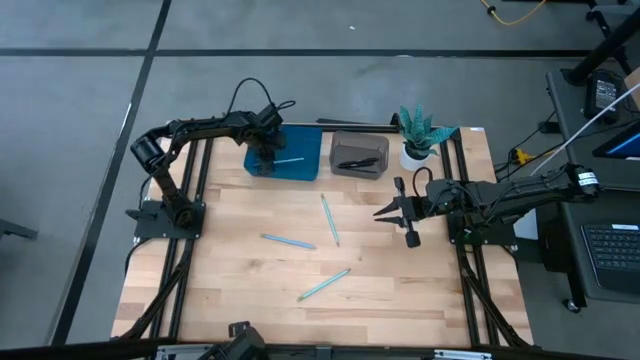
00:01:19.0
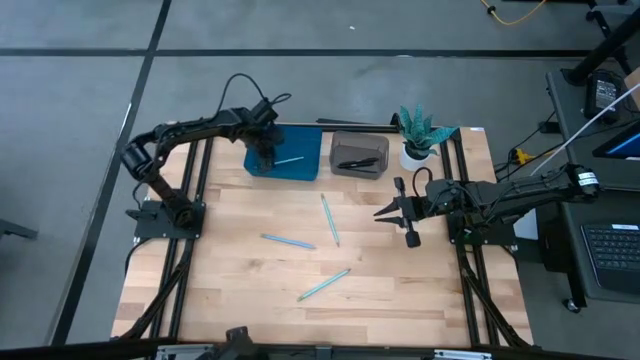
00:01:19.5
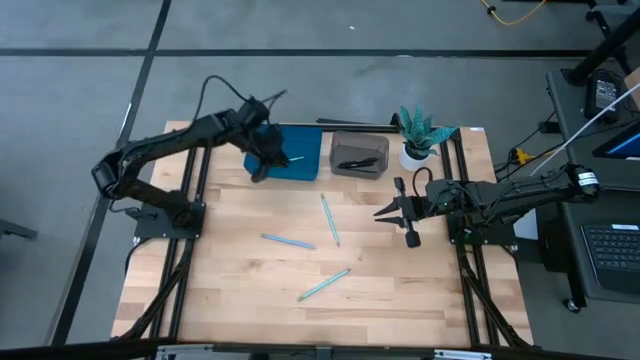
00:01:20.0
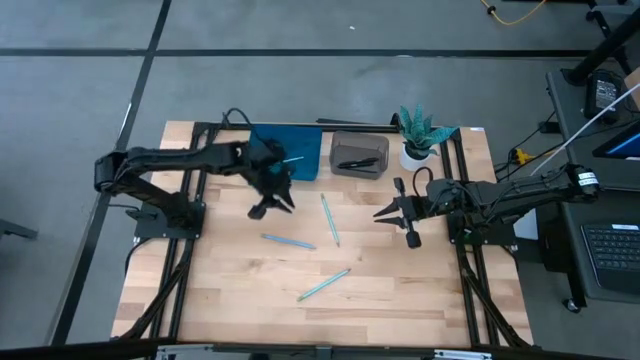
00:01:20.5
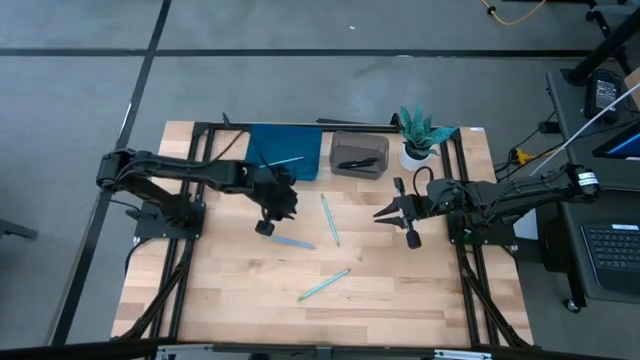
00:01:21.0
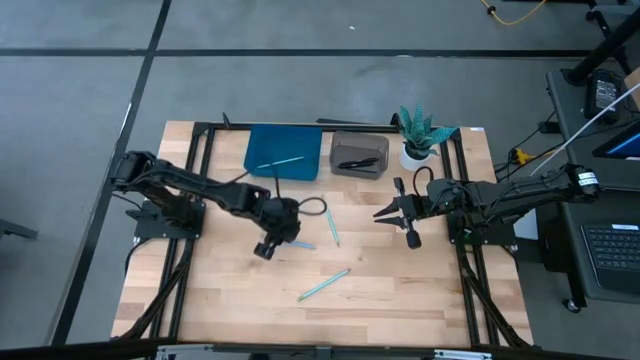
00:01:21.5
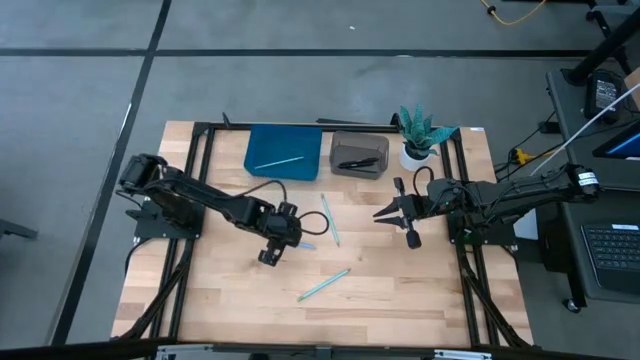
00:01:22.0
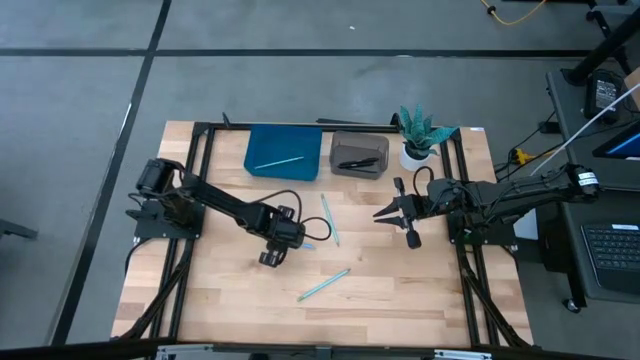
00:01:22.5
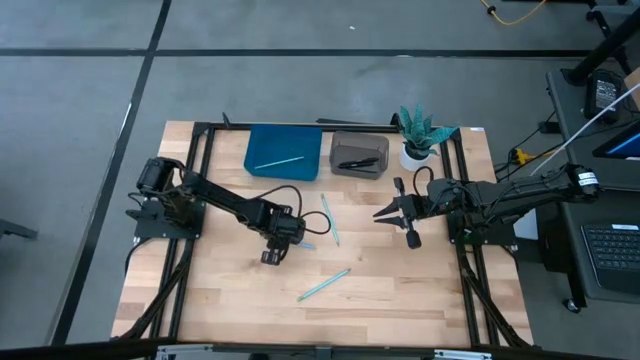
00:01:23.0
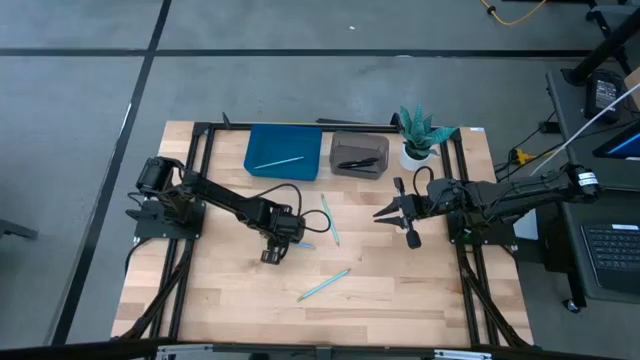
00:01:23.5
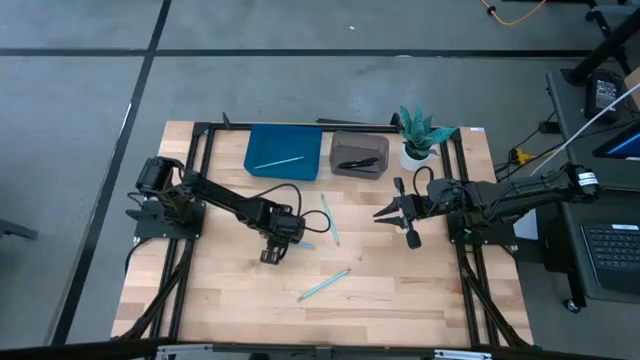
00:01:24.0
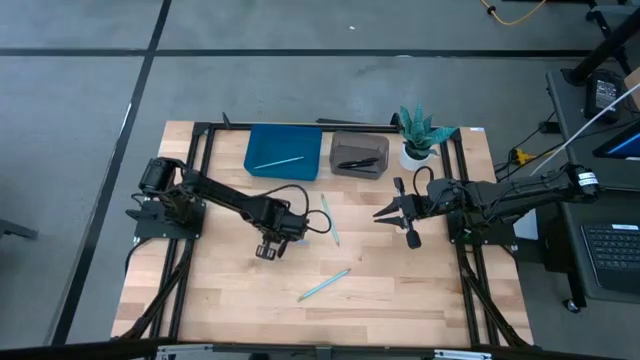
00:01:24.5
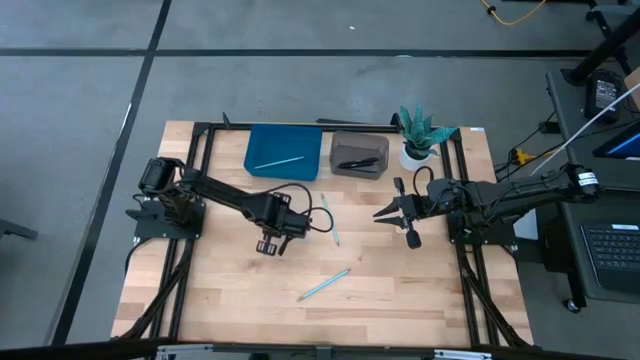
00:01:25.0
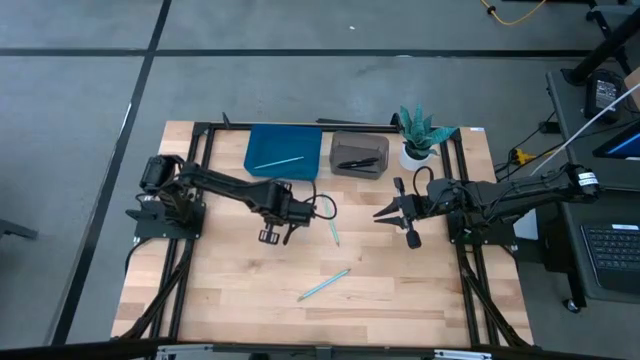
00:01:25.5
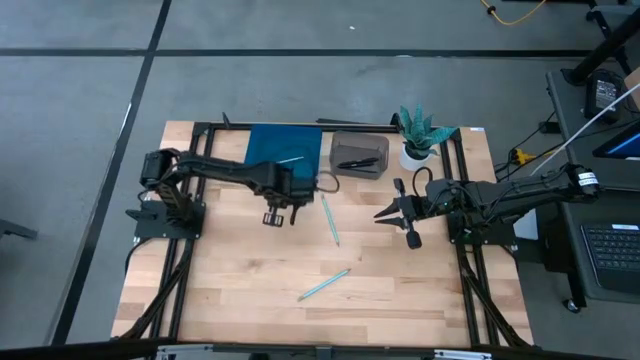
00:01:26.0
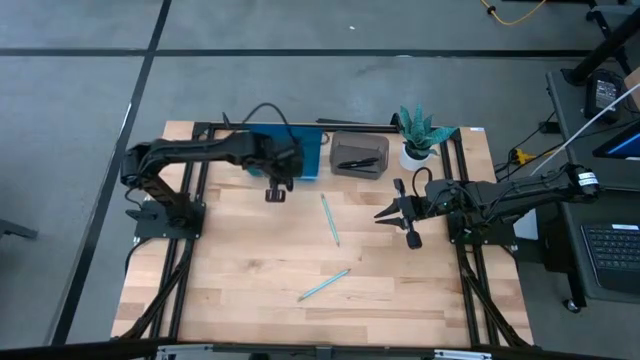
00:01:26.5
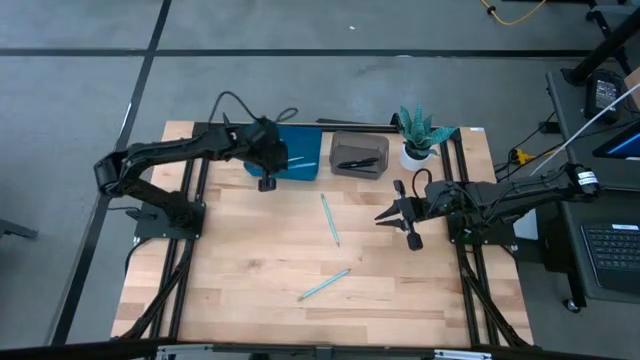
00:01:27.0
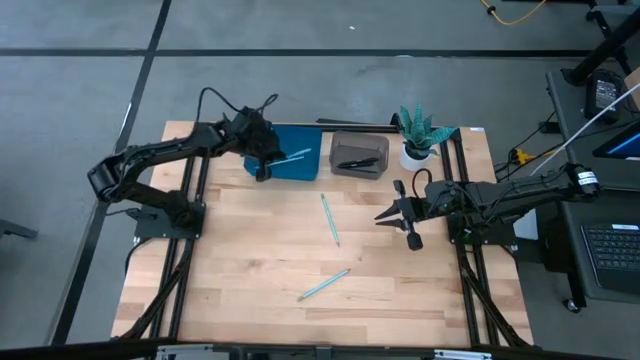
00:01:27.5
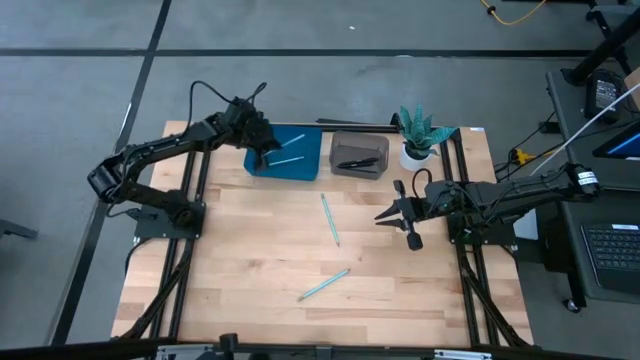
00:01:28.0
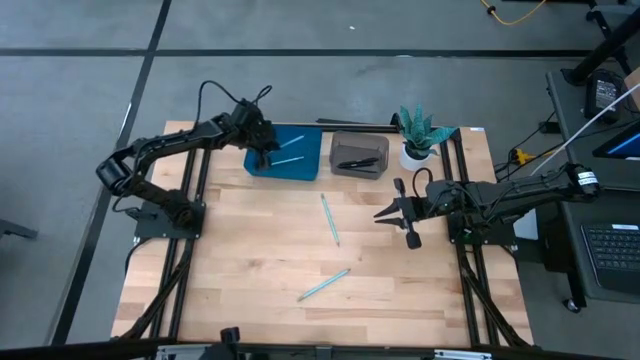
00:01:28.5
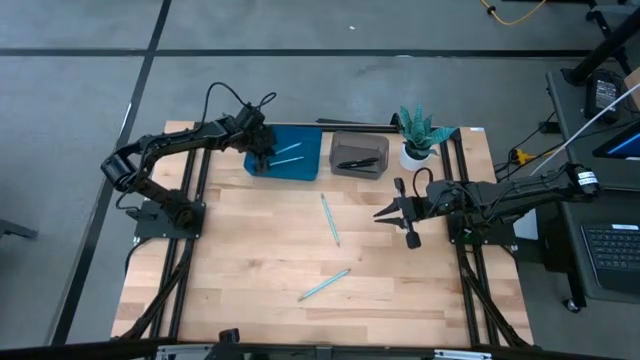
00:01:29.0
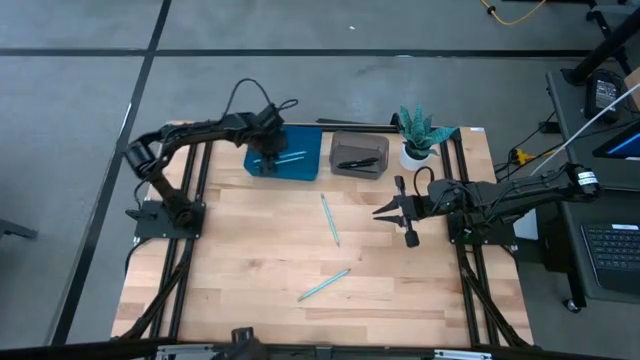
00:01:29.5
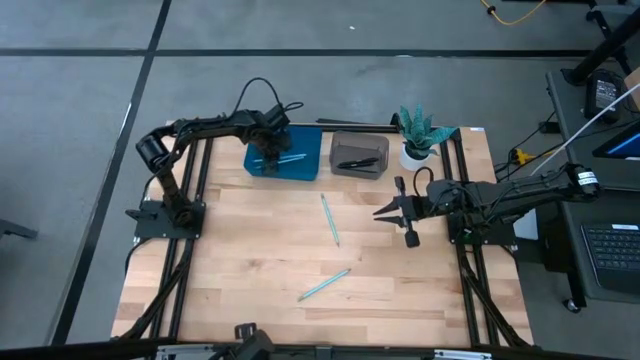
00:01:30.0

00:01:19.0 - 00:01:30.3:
Task: Sort pens & pencils
Put the light blue pencil into the blue bin

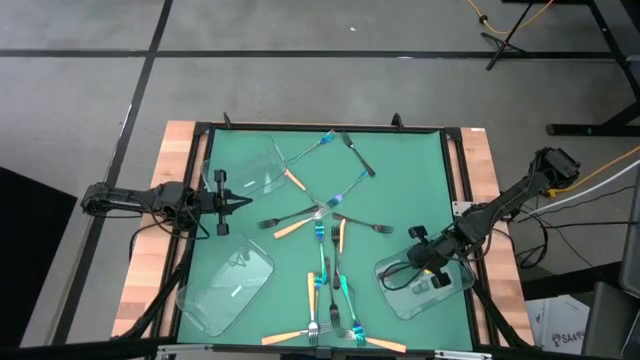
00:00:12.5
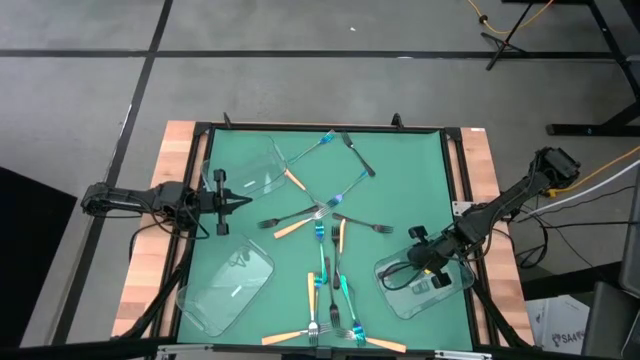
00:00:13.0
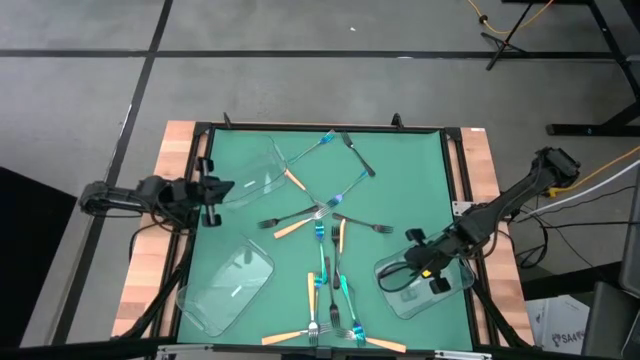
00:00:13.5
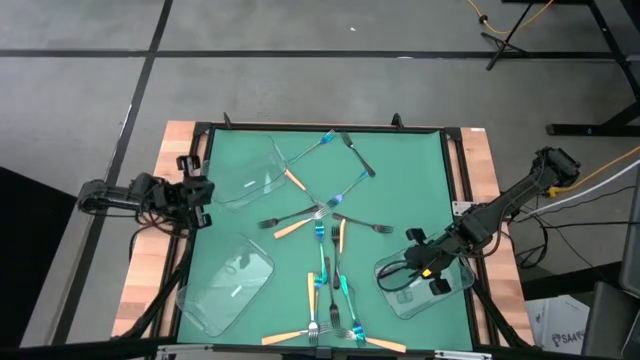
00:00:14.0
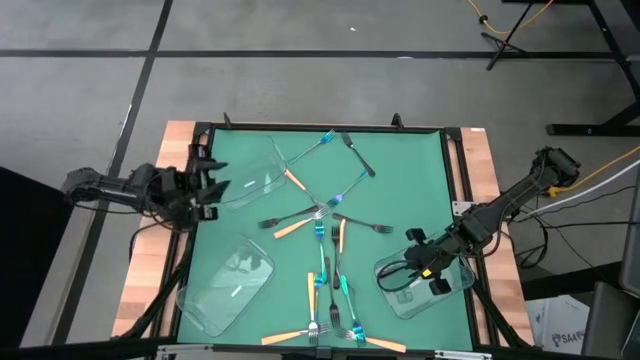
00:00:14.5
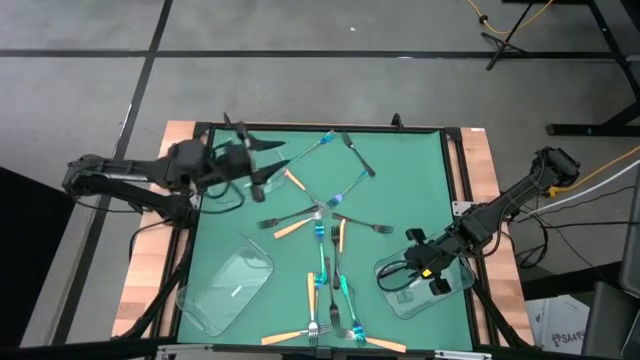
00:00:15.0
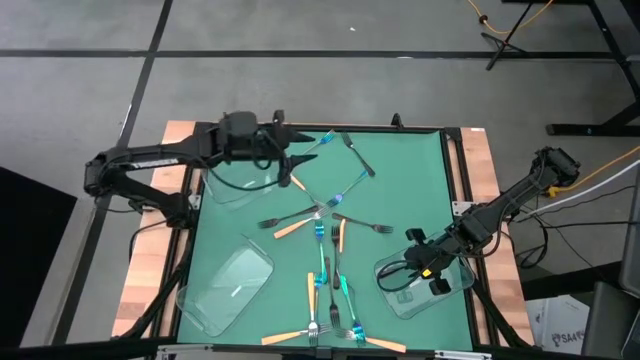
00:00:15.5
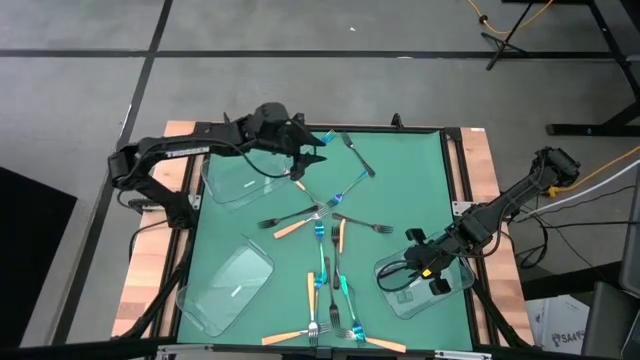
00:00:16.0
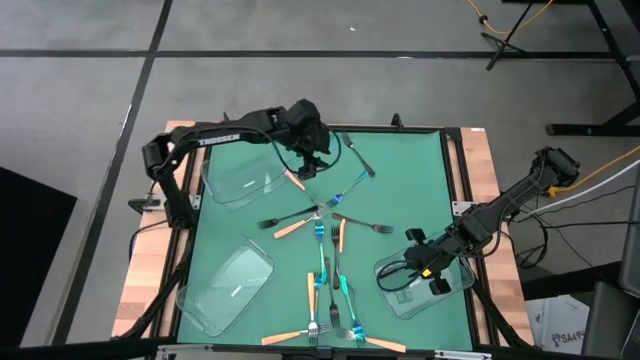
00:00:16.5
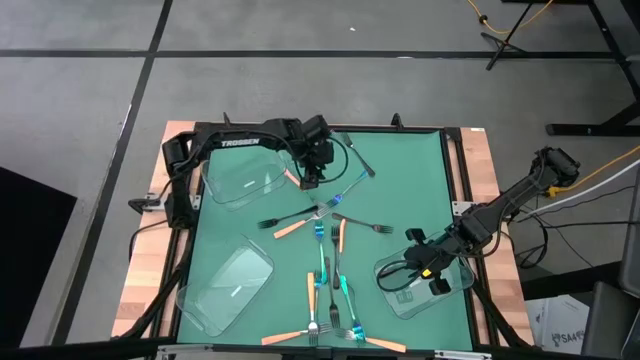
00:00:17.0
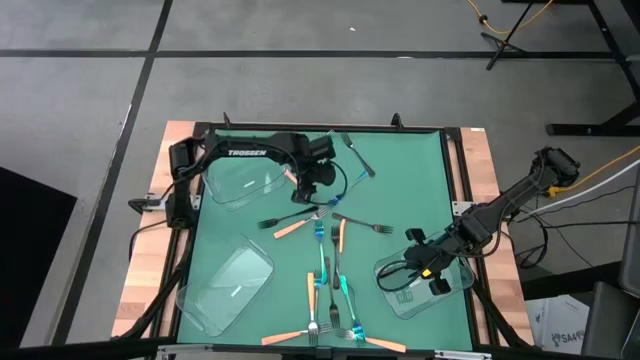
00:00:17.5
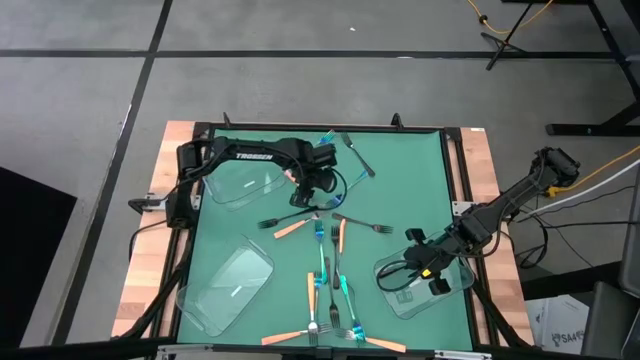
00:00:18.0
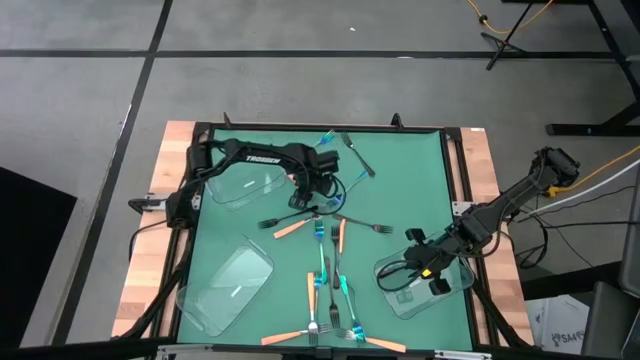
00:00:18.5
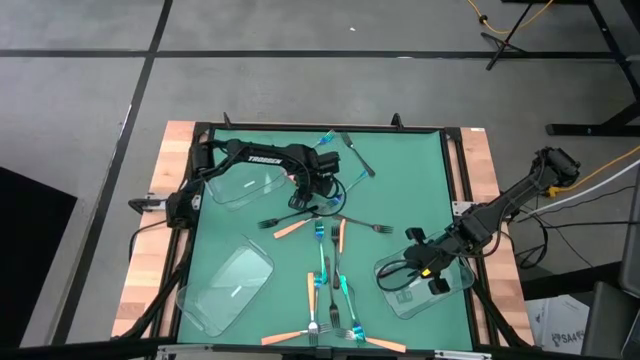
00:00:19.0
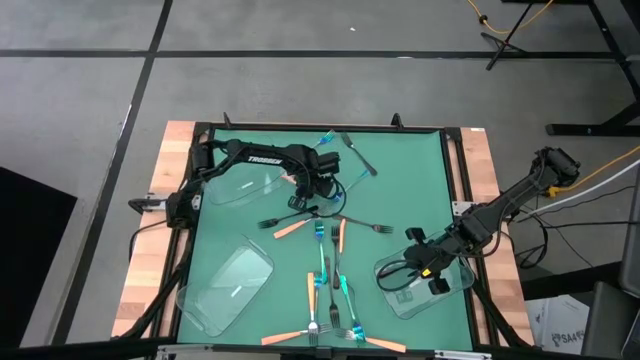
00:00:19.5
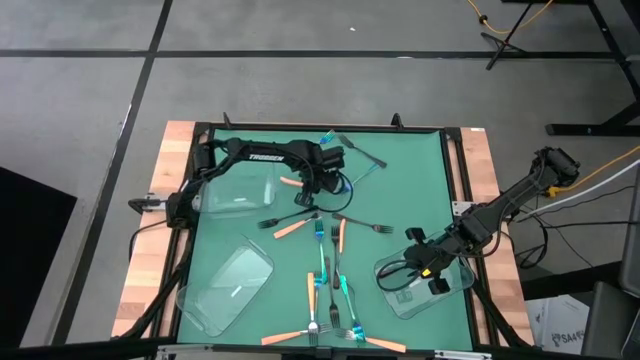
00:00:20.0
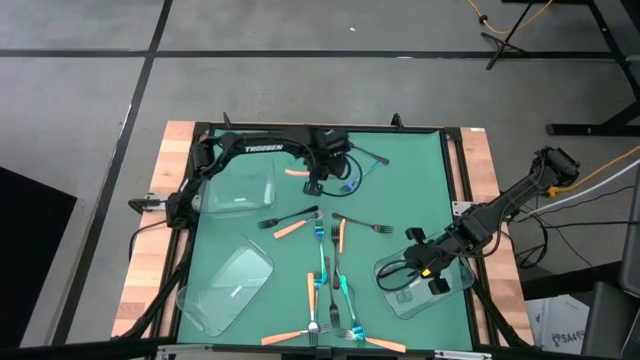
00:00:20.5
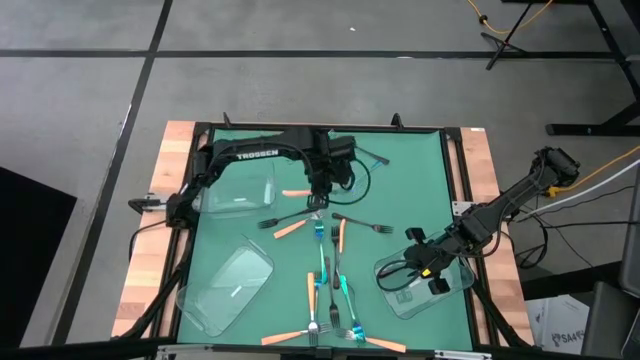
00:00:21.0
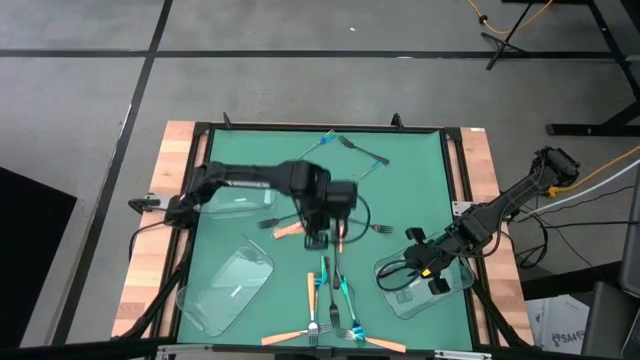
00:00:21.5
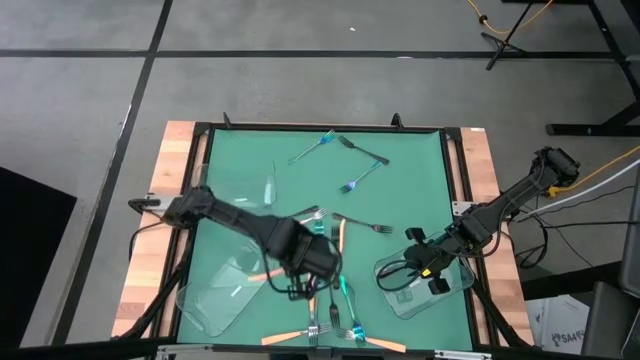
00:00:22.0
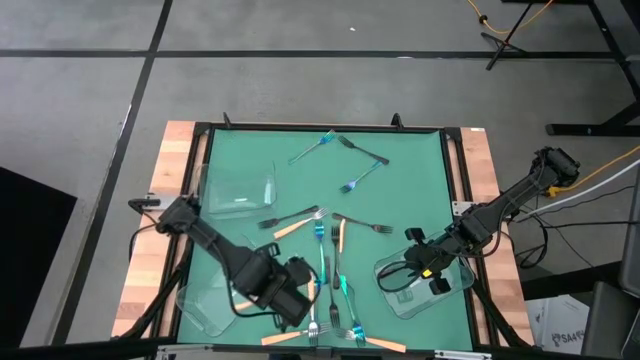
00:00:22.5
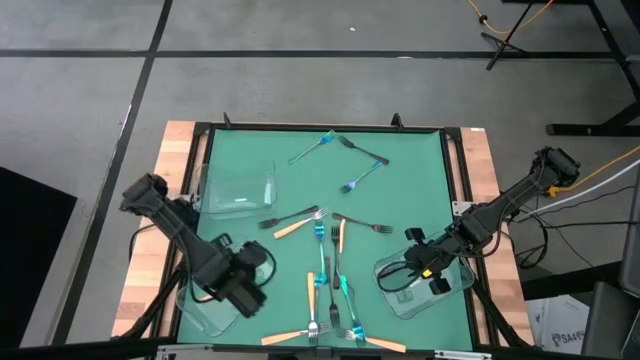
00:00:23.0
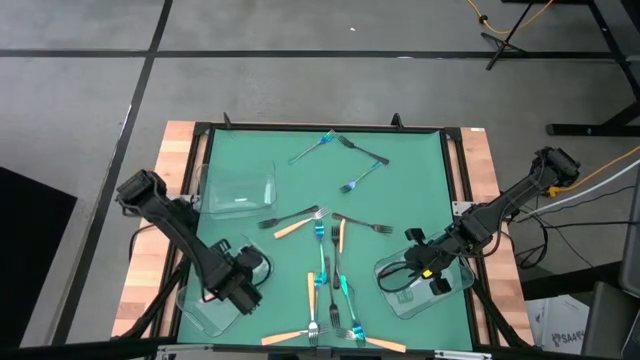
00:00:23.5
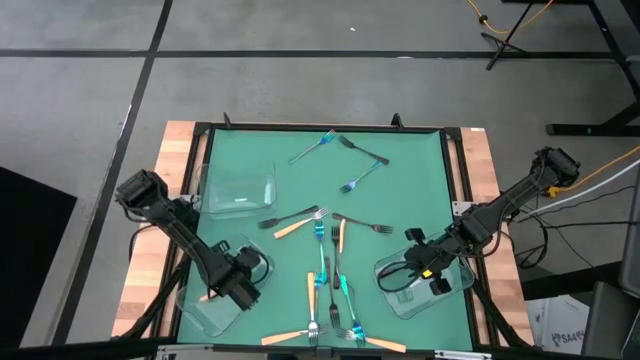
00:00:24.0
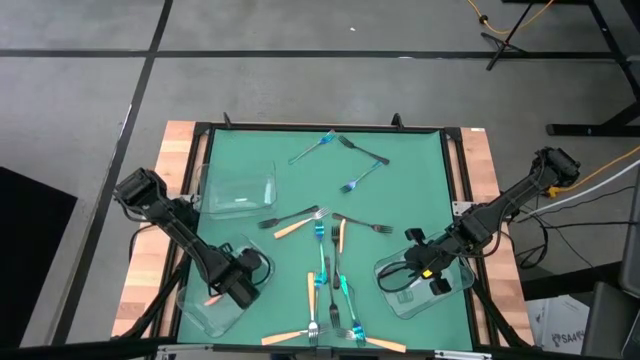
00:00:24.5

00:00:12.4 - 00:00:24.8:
Task: Sort silverware by color (type)
Put the yellow fork into the bottom left transparent bin
